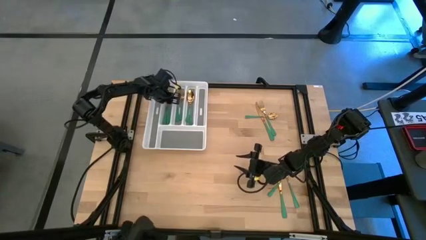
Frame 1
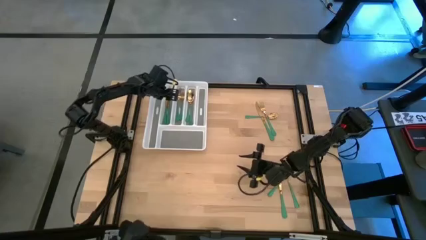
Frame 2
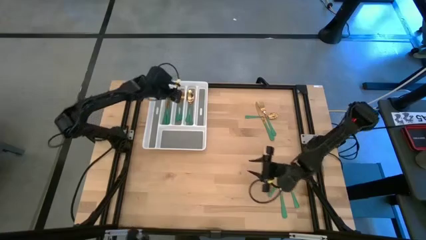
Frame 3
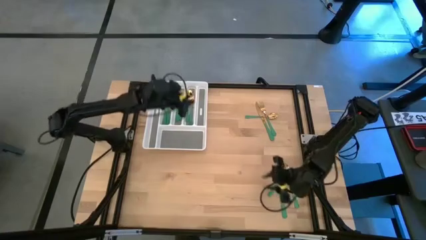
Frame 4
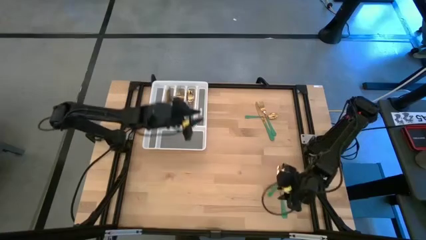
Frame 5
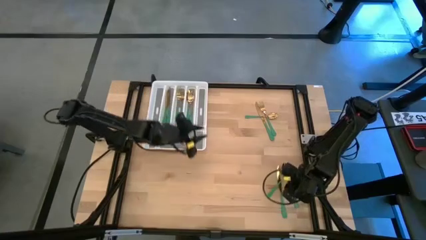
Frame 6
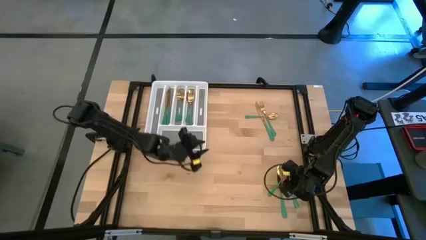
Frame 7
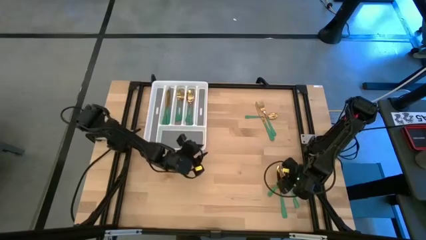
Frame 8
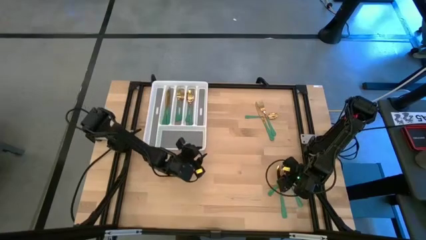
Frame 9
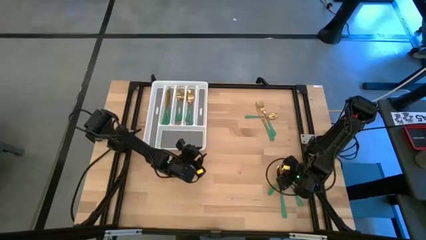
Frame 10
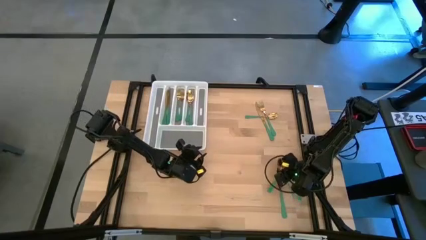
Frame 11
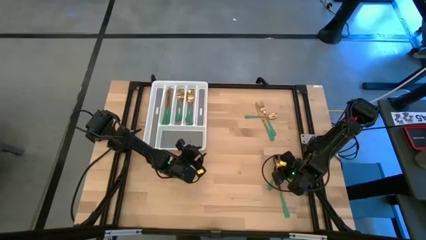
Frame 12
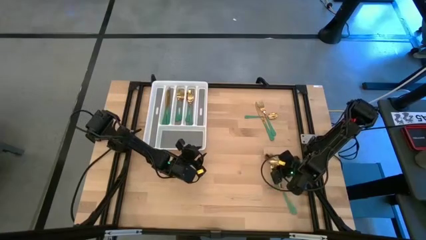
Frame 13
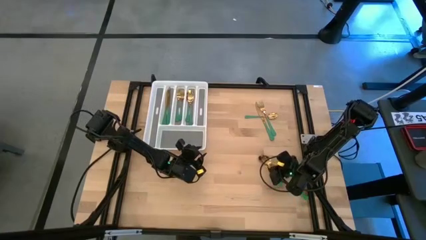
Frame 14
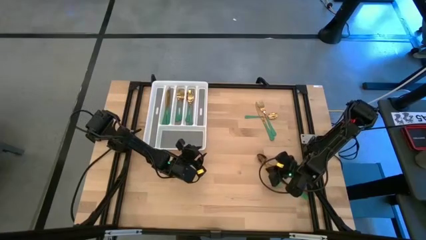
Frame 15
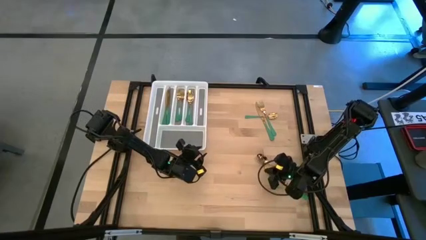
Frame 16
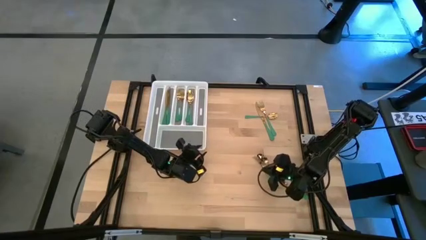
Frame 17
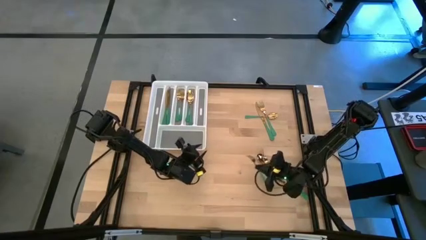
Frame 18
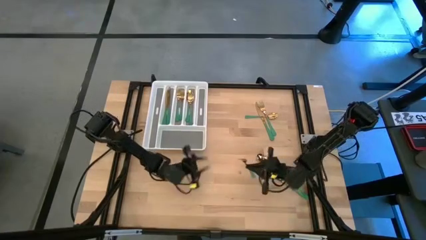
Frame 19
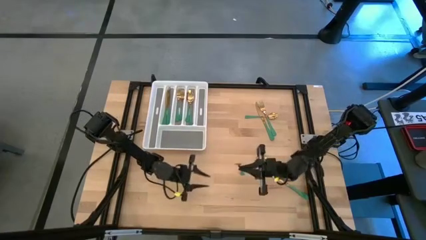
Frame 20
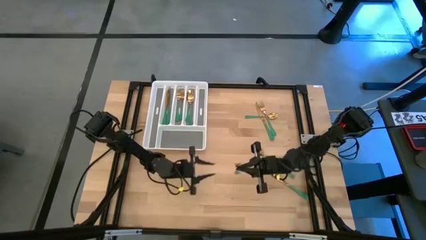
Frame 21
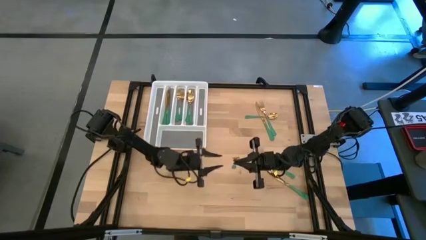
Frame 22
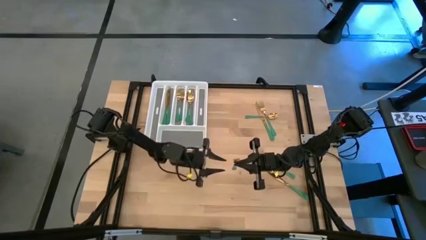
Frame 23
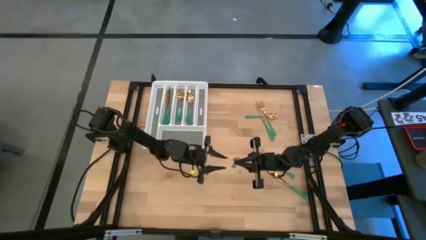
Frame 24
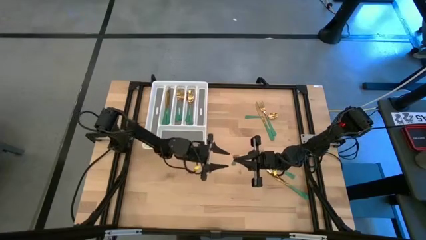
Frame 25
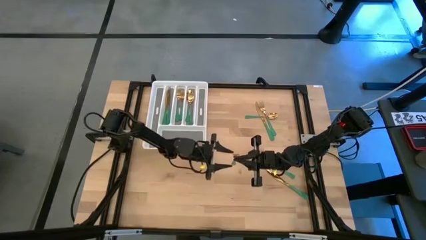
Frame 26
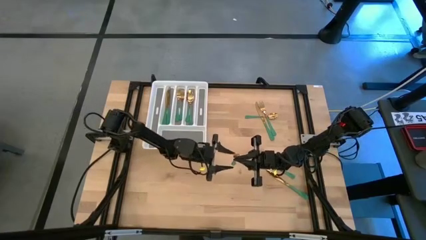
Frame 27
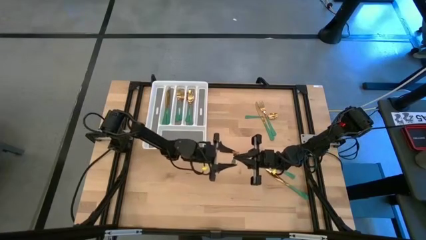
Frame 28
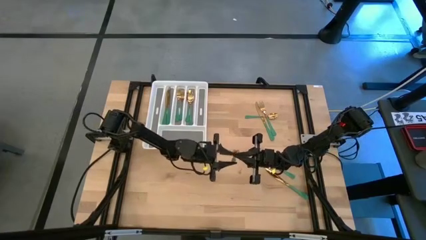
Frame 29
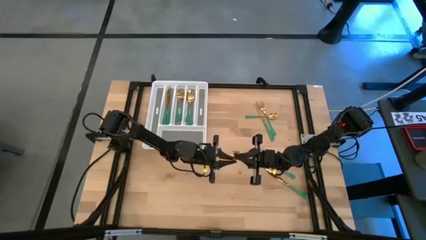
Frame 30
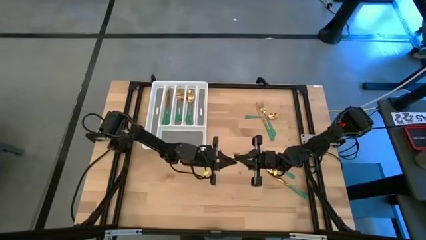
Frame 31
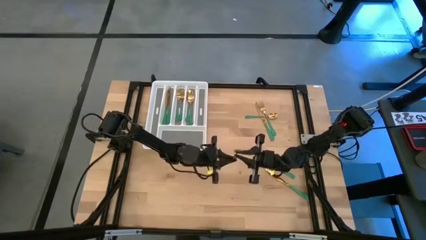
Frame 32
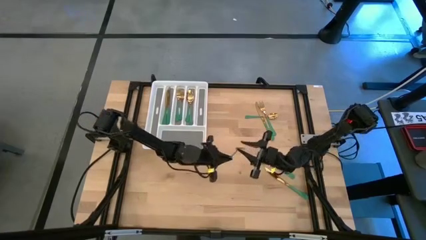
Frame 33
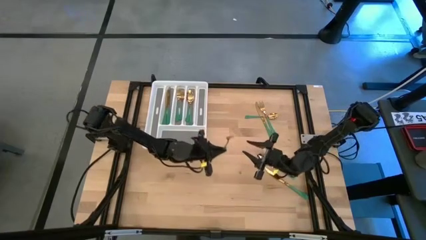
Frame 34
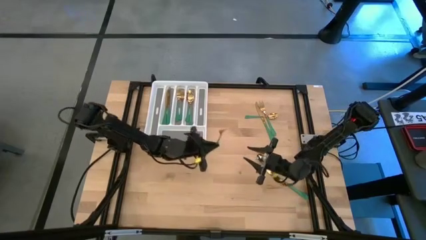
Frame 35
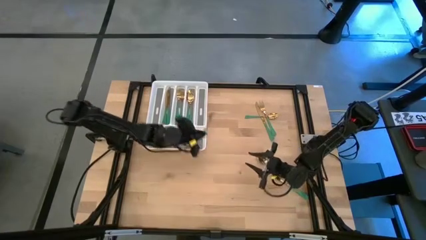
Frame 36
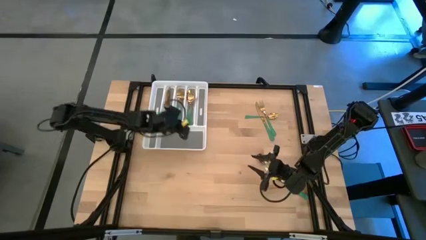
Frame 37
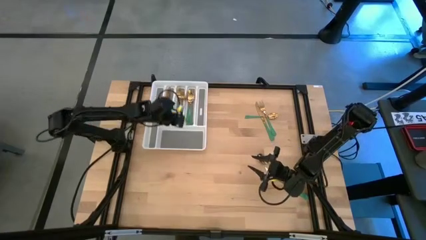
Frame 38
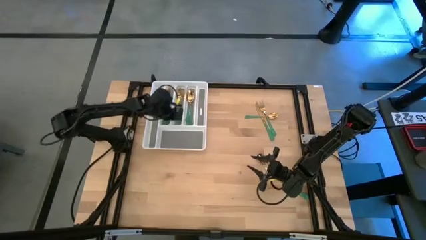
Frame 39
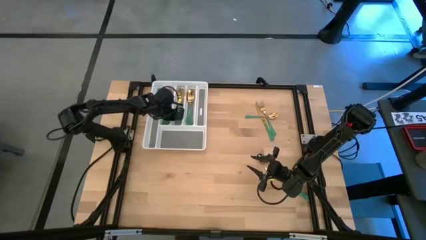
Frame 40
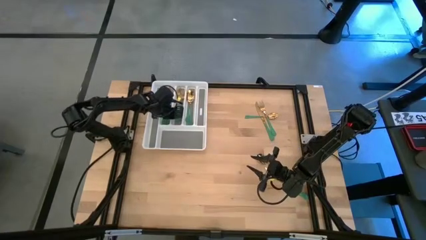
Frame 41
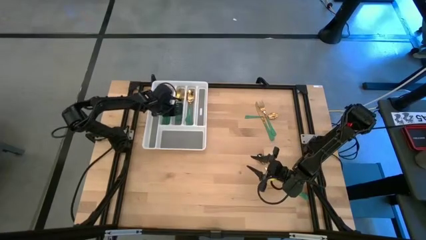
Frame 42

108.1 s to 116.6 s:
Task: Sort silverware
Put the green fork into the white cutlery tray

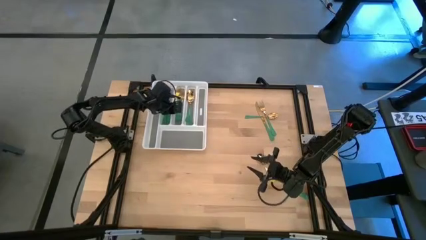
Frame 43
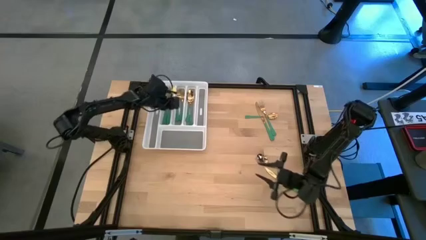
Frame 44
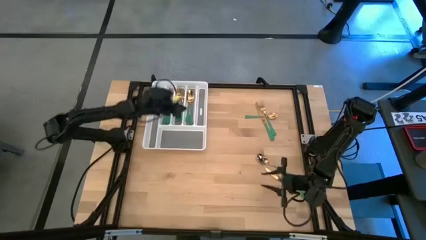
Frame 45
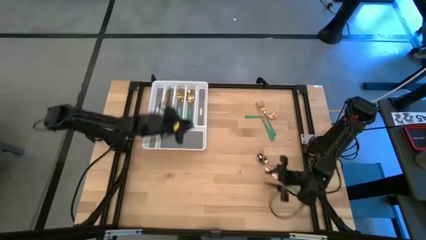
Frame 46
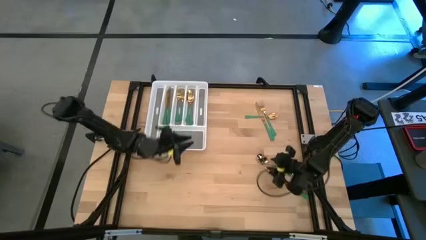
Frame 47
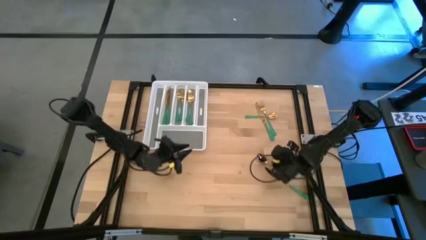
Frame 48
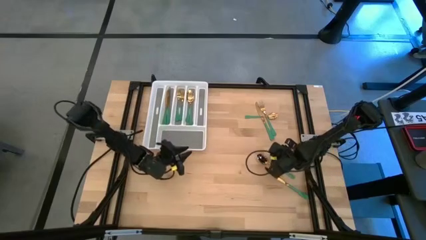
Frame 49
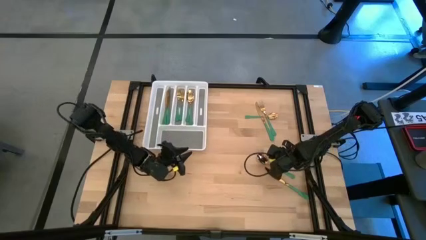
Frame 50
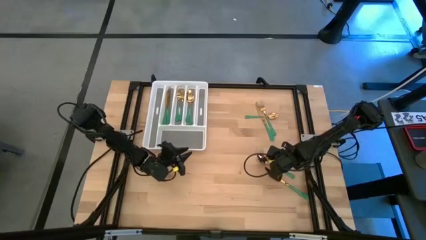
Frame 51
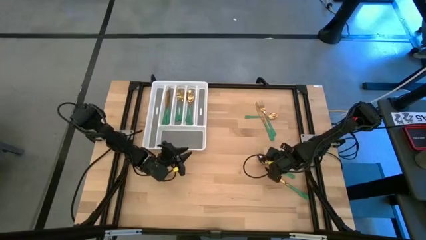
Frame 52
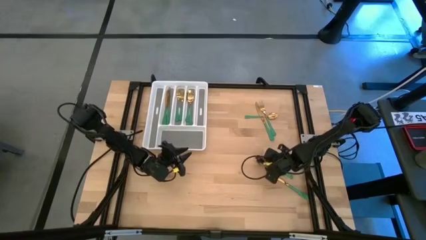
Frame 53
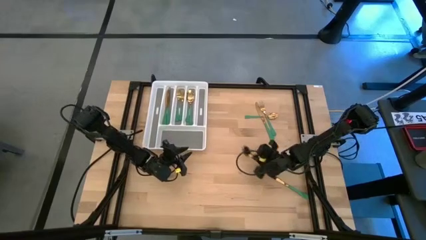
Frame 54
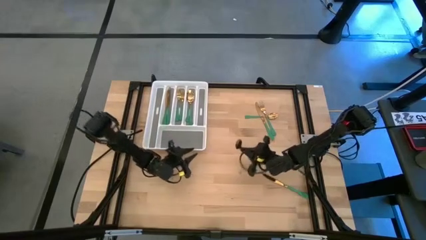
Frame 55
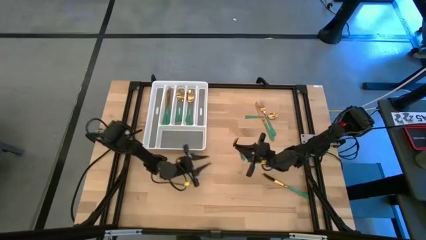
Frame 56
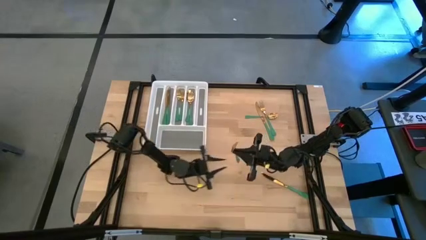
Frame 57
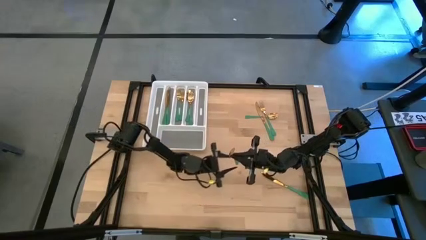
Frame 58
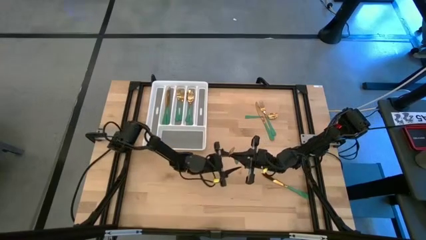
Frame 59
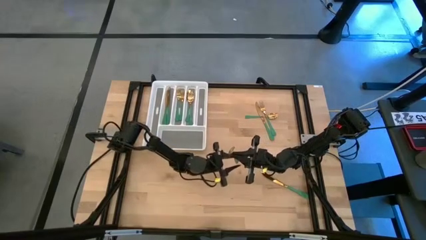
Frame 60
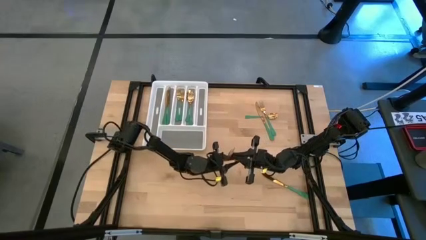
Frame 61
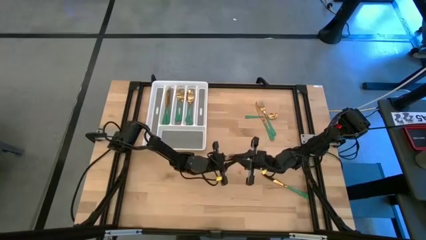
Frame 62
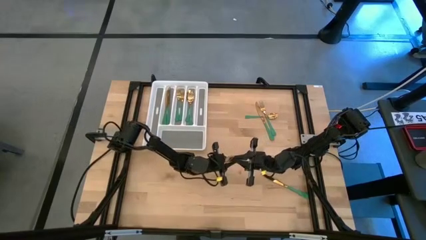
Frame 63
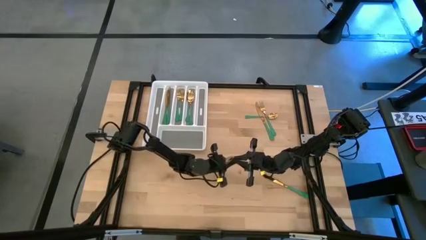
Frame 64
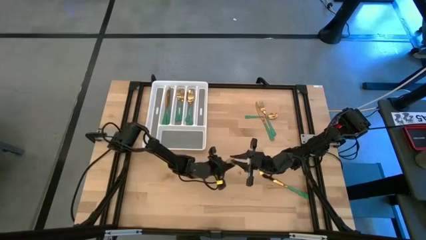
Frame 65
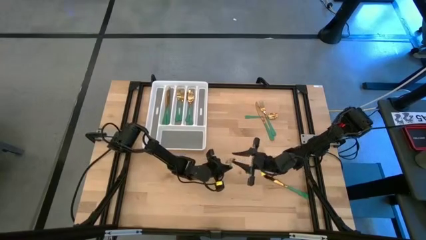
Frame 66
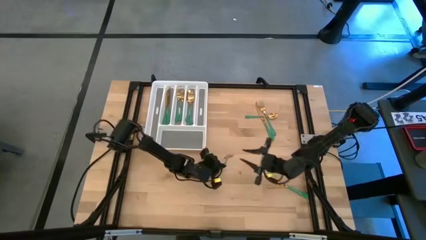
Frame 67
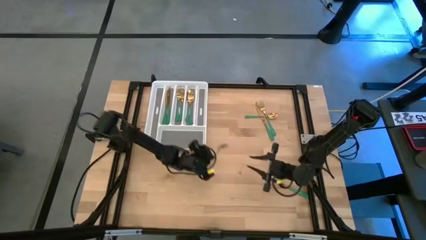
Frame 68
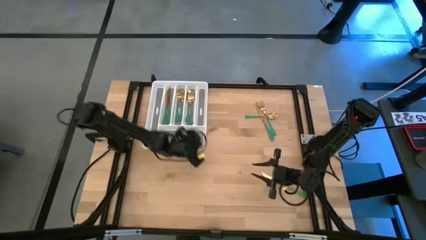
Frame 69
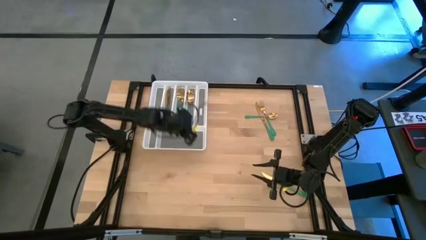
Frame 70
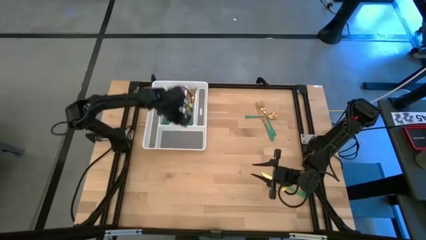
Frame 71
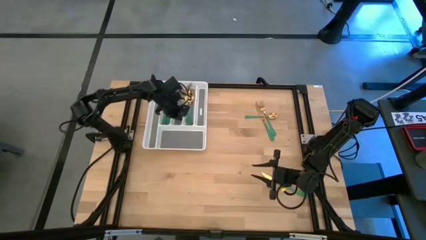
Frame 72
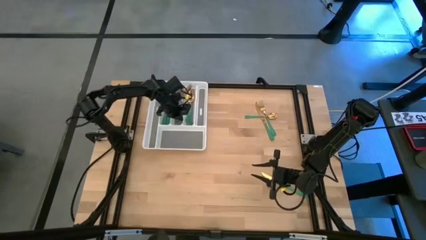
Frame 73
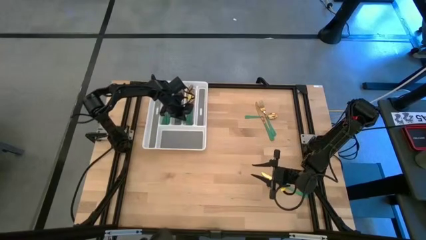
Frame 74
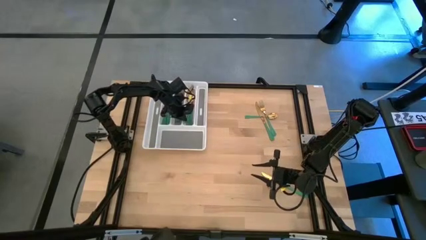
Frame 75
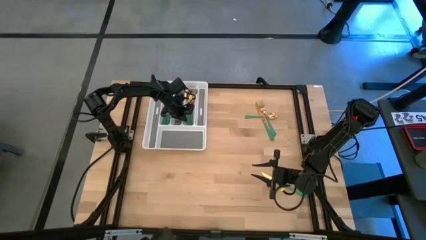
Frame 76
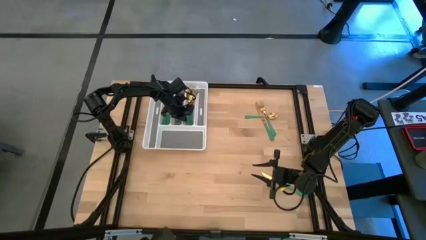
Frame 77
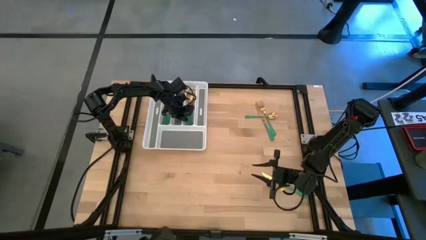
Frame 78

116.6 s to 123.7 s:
Put the green spoon into the white cutlery tray
